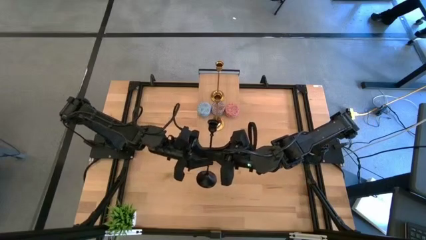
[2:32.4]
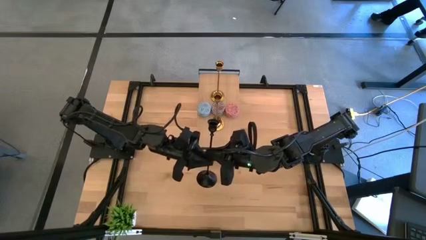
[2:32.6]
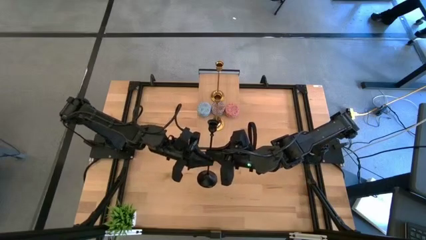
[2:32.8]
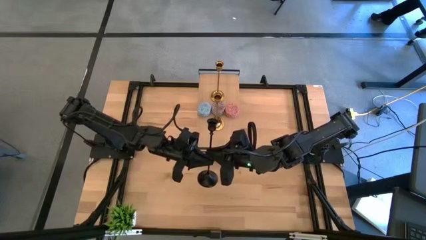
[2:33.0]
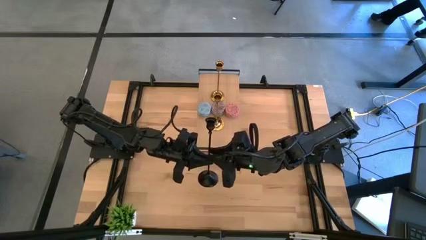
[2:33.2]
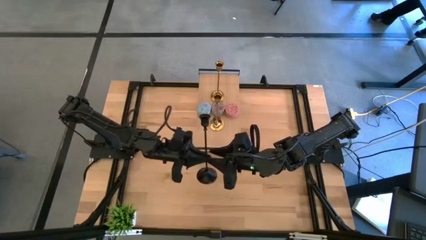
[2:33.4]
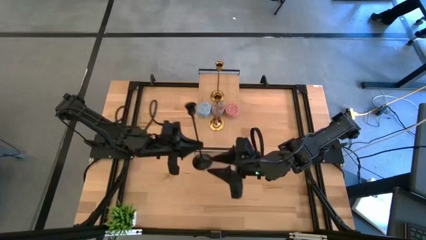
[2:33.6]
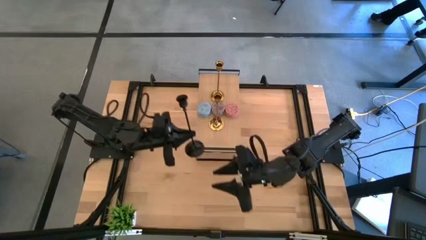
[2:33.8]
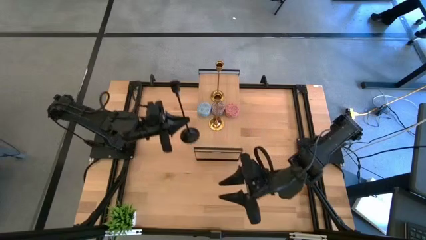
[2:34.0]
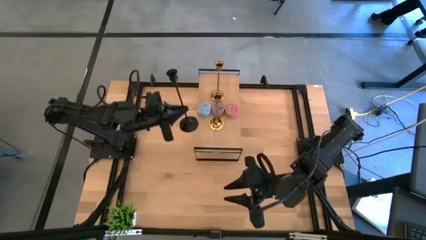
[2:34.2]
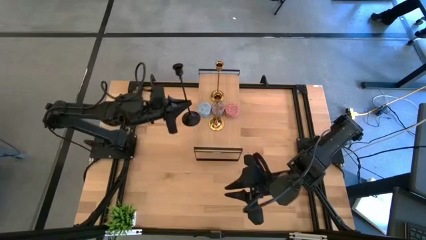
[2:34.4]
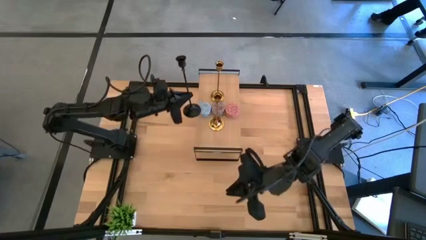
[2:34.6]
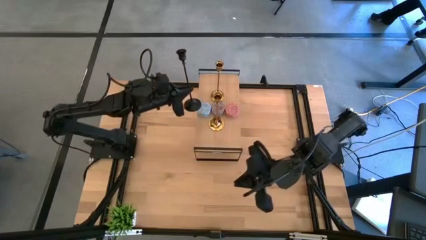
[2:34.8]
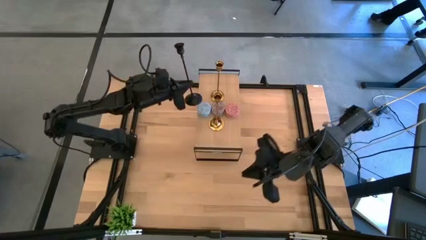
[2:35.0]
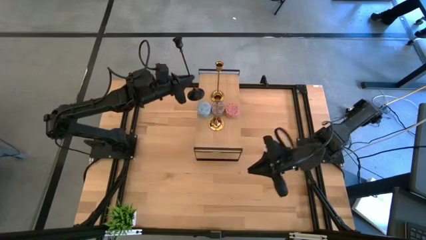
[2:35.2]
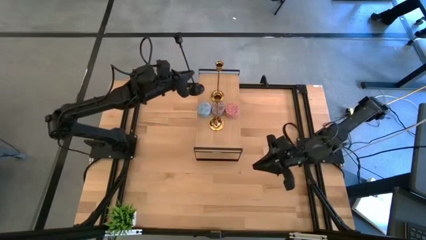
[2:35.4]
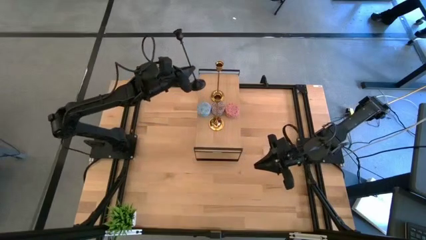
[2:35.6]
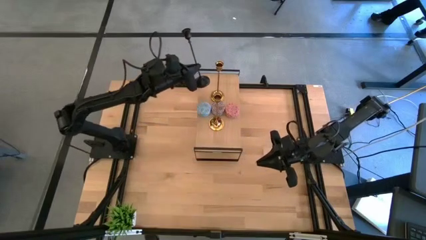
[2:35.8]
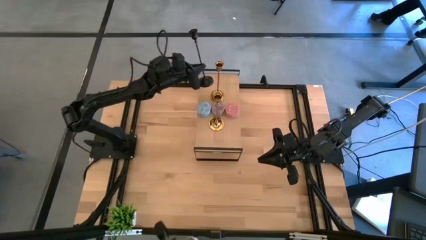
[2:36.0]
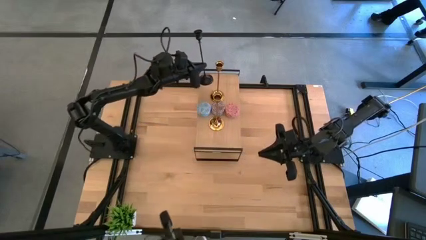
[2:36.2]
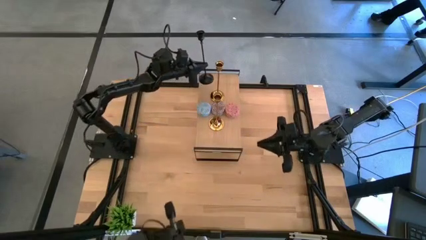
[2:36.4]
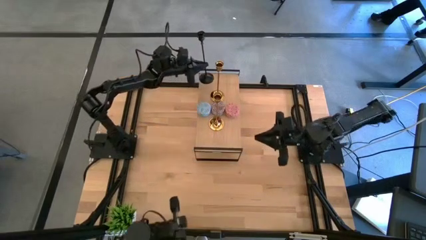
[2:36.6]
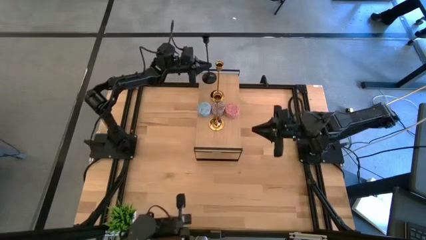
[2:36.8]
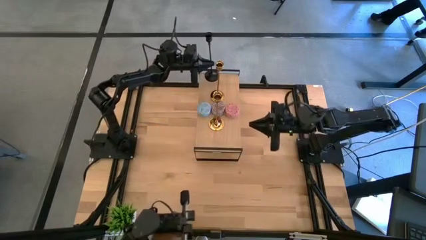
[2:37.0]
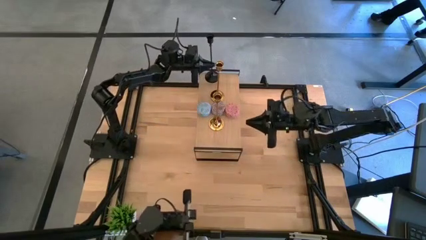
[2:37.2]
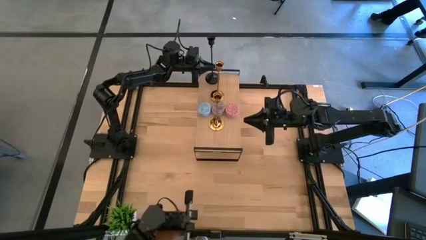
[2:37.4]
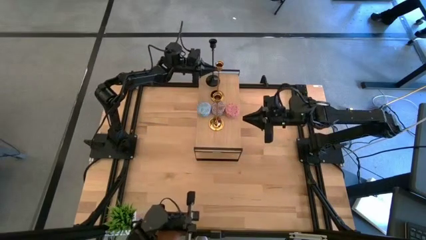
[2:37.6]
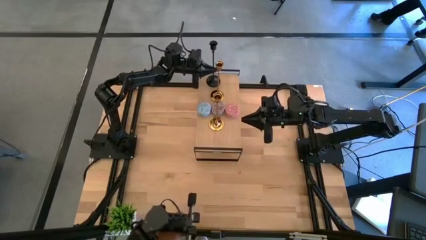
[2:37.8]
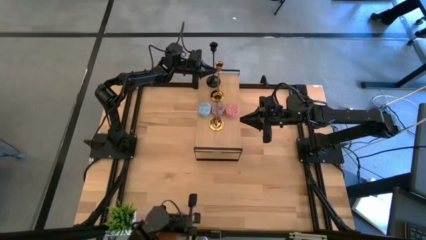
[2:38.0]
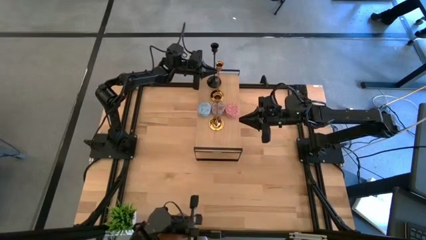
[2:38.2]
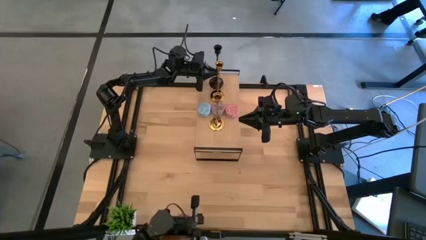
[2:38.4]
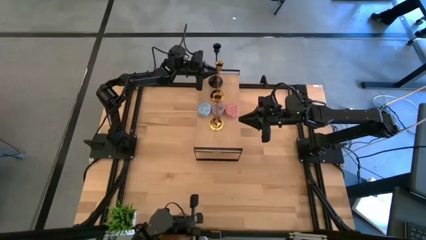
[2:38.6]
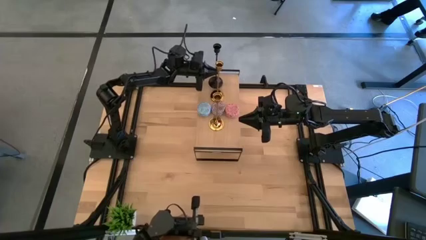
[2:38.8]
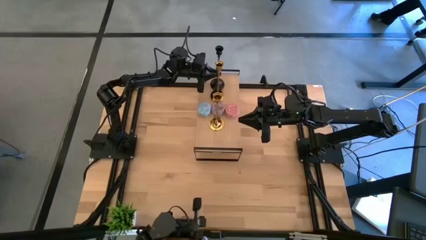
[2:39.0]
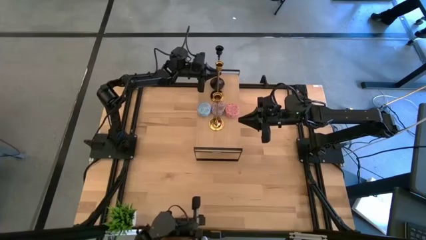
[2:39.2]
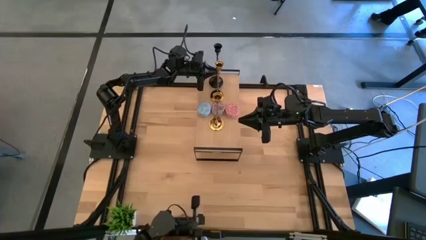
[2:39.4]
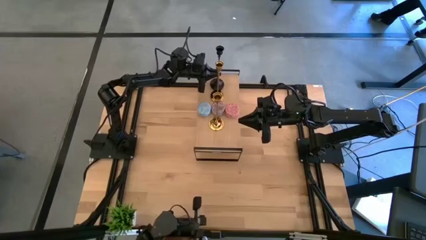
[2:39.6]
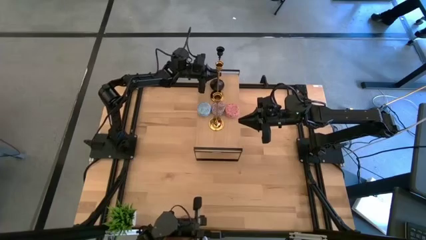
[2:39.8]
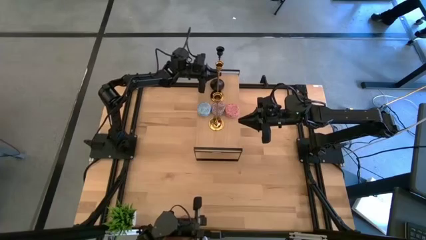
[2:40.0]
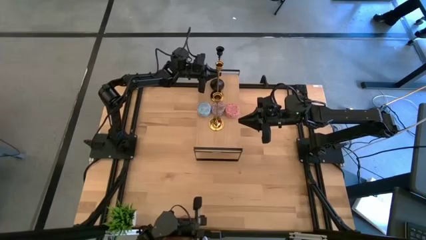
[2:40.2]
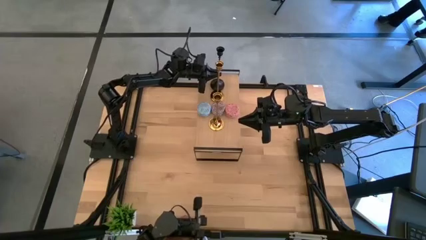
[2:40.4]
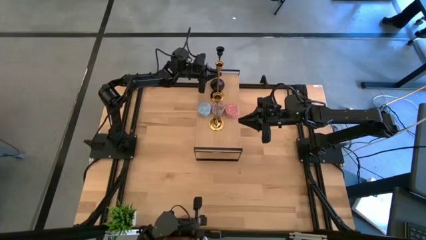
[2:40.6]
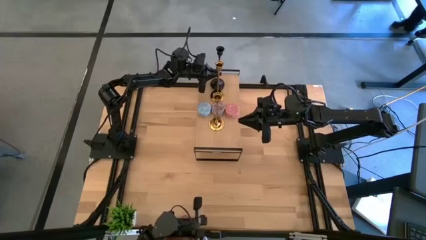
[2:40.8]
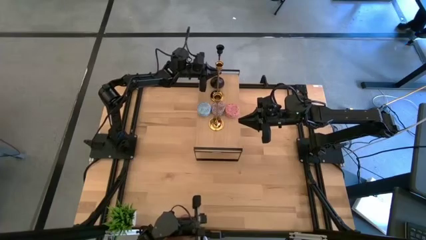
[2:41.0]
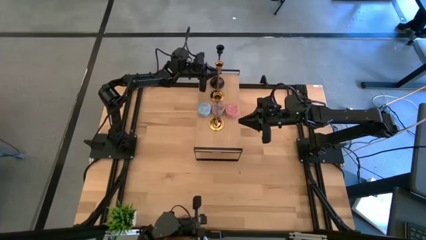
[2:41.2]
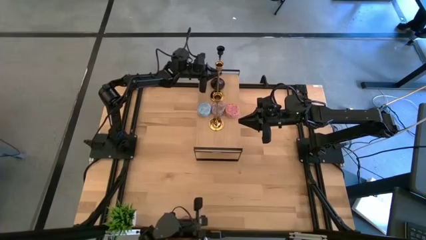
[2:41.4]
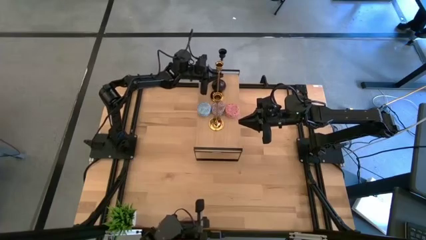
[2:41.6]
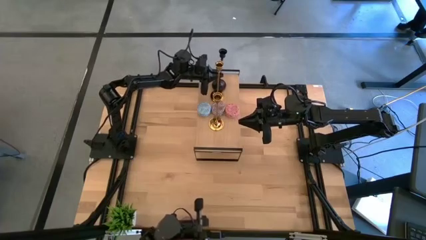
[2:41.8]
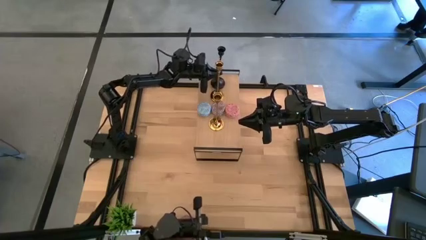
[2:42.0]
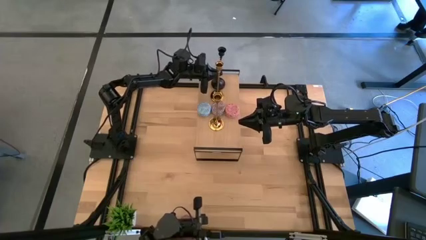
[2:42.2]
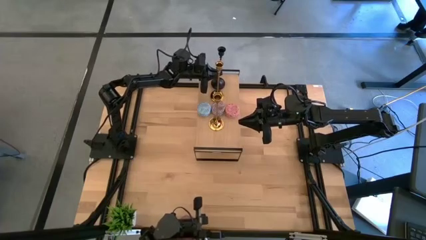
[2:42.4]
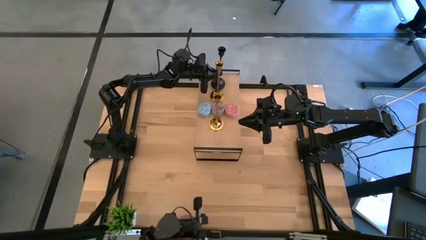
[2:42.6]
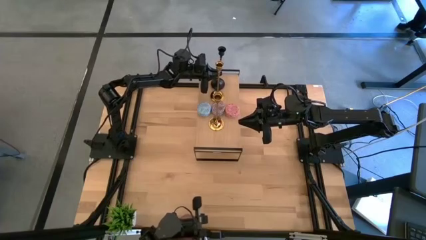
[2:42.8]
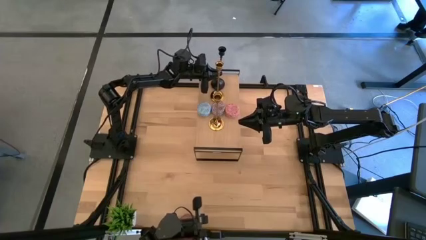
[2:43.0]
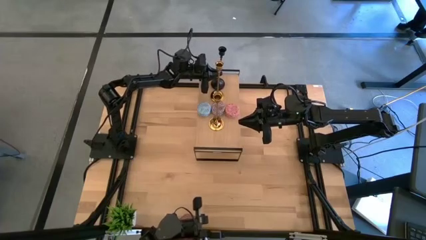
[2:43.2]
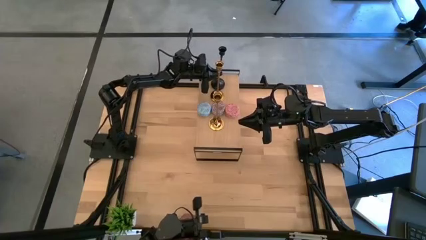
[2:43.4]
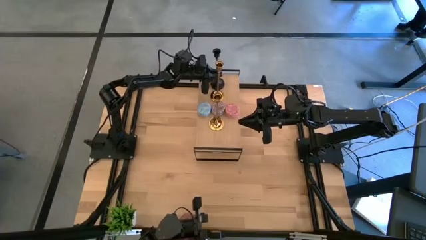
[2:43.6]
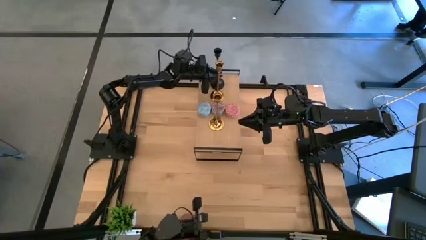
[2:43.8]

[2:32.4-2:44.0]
Task: Pick & Place candle stick holders
Put the black candle holder on the shelf

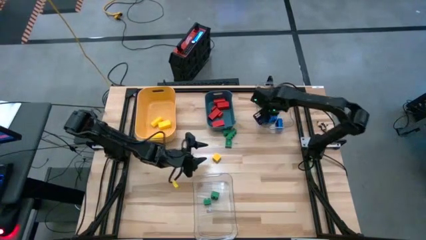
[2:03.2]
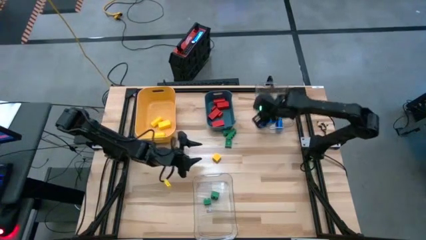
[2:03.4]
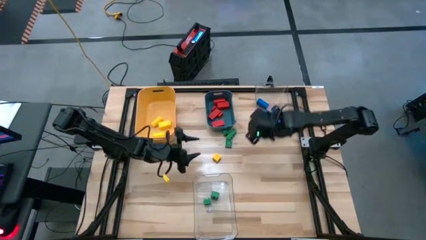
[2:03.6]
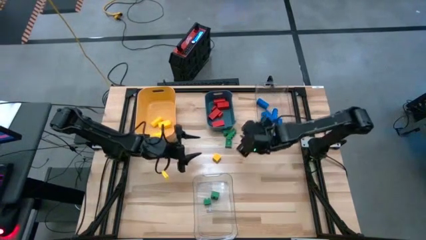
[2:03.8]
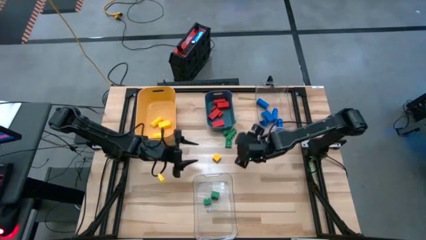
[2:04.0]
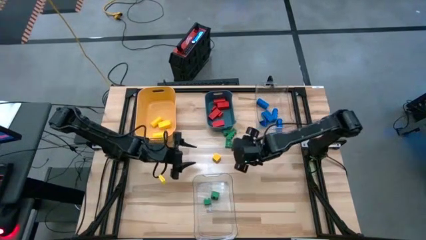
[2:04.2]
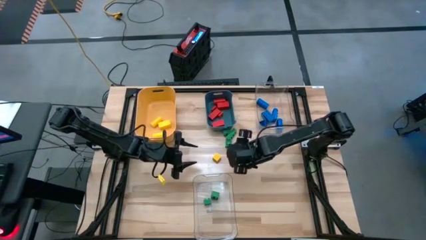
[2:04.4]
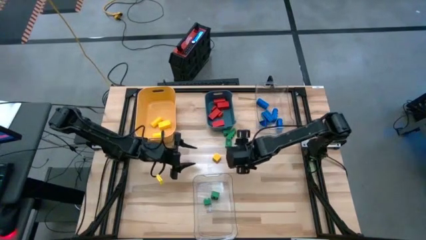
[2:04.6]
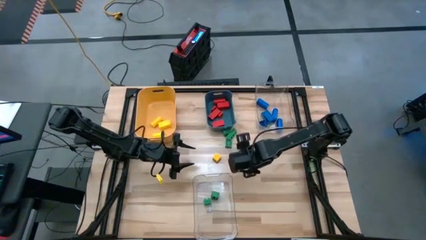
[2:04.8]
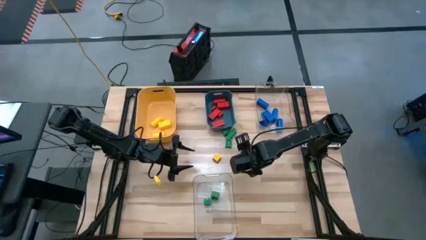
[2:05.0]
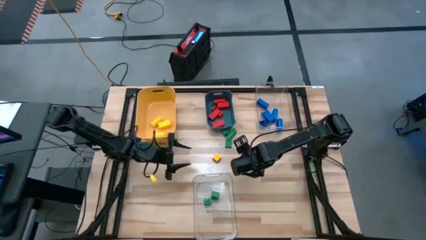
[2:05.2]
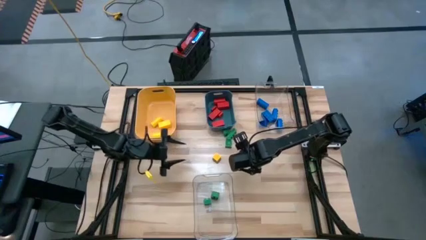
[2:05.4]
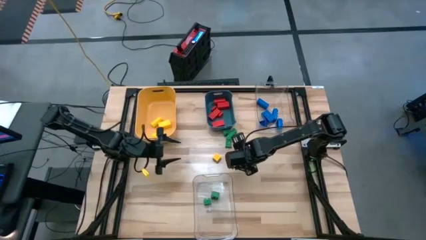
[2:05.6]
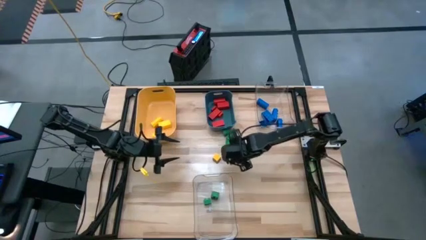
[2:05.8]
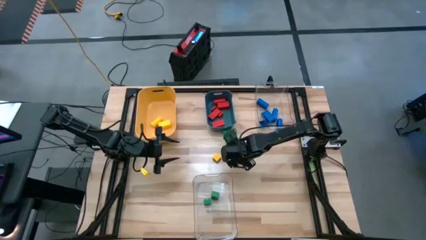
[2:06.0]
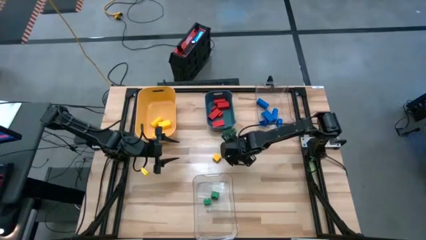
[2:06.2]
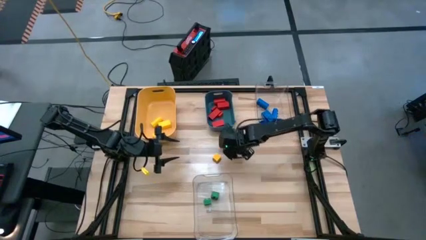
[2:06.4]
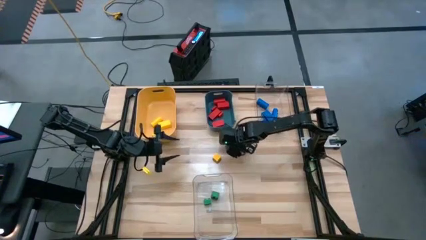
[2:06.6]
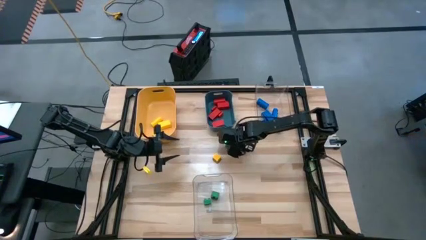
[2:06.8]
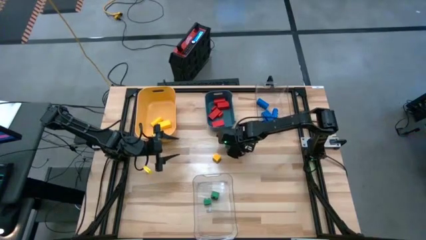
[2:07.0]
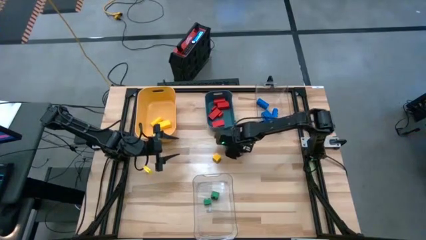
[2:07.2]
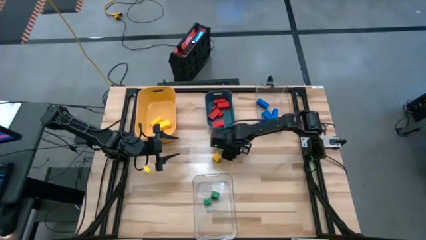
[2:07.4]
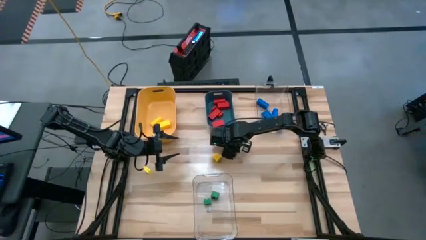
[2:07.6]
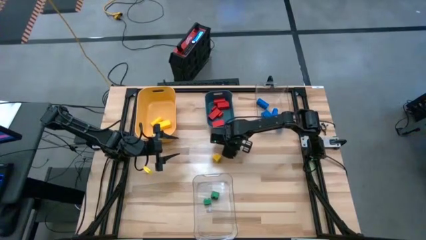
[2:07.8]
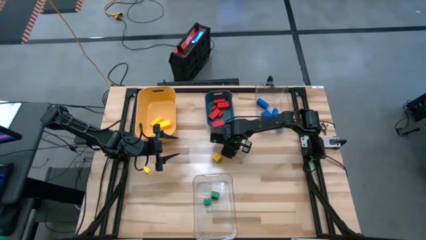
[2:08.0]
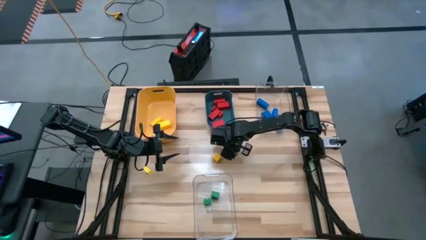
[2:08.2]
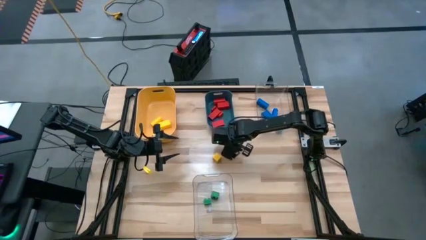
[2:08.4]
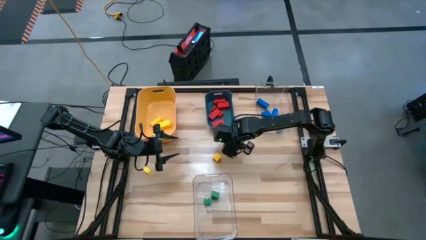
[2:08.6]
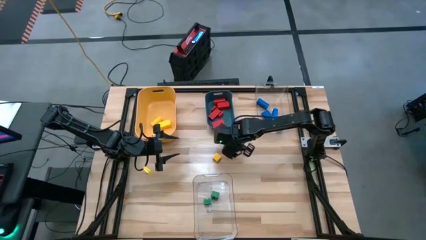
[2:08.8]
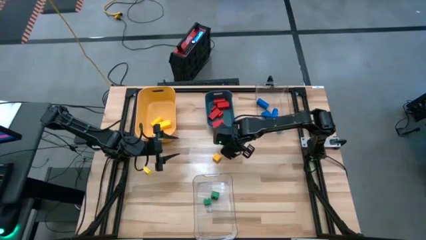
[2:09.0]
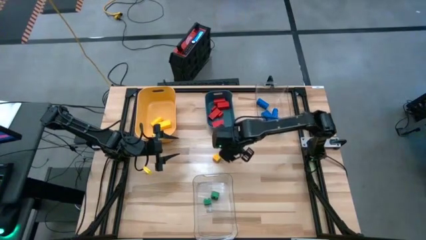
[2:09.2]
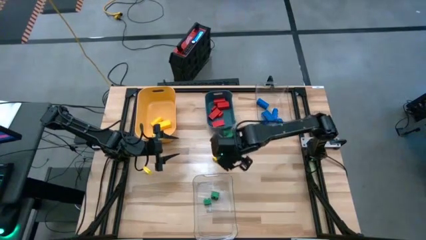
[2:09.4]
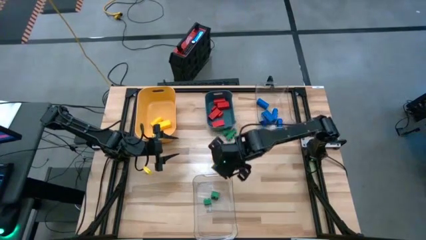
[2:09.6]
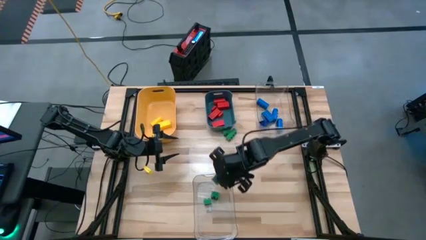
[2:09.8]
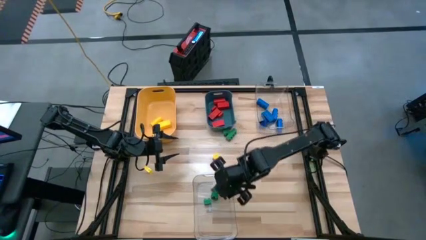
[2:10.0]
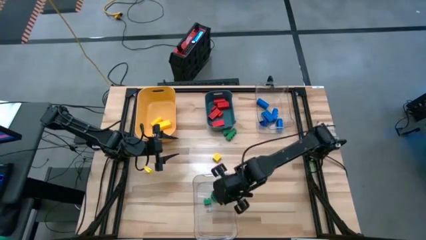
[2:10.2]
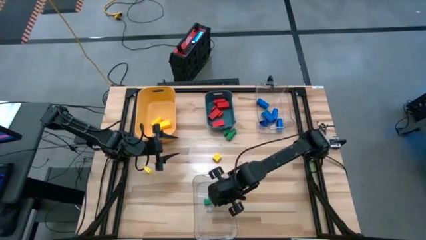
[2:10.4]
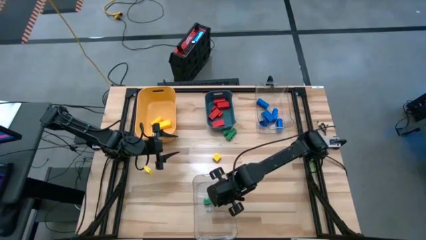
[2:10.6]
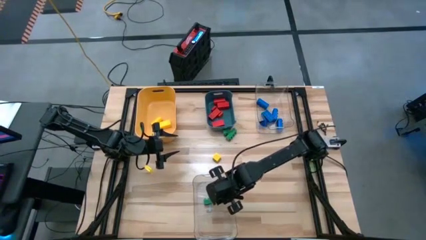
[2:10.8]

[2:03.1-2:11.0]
Task: Sort blocks
Put the green game piece into the bottom transparent bin
